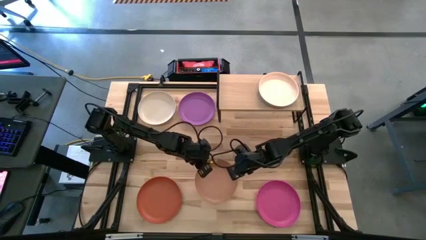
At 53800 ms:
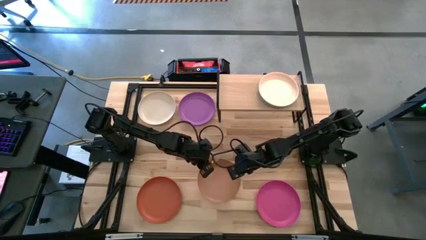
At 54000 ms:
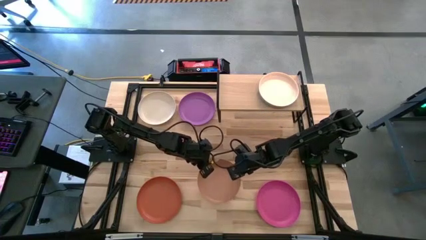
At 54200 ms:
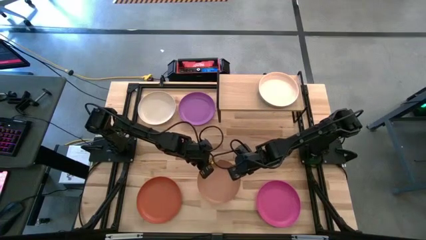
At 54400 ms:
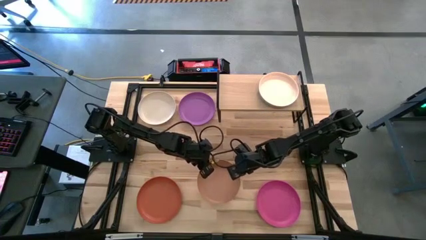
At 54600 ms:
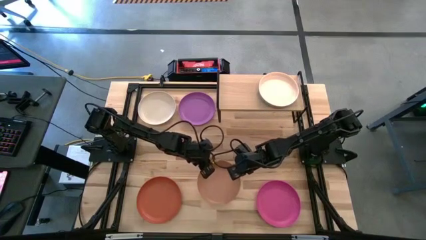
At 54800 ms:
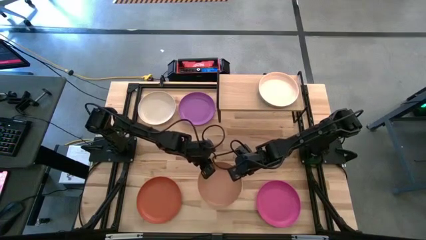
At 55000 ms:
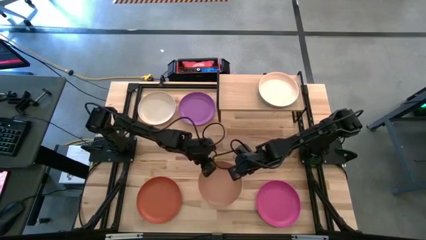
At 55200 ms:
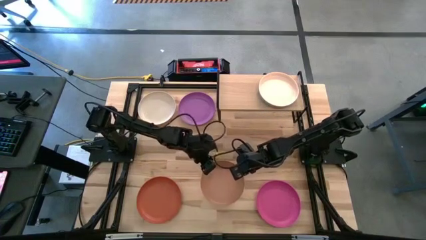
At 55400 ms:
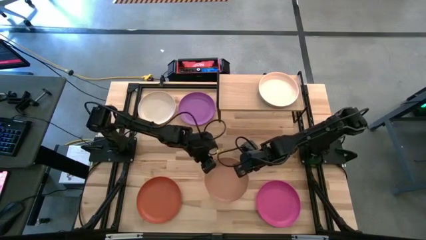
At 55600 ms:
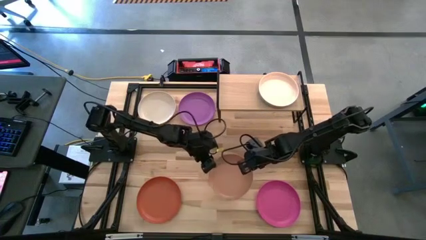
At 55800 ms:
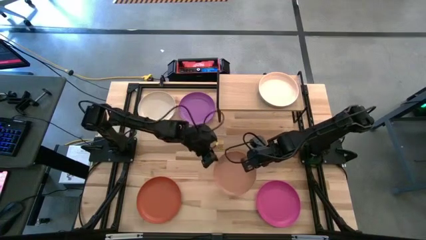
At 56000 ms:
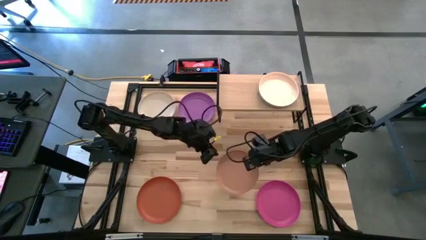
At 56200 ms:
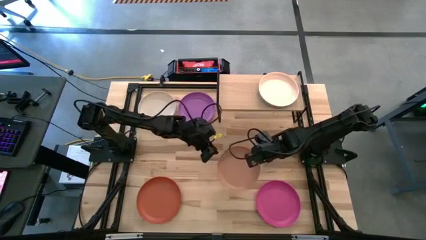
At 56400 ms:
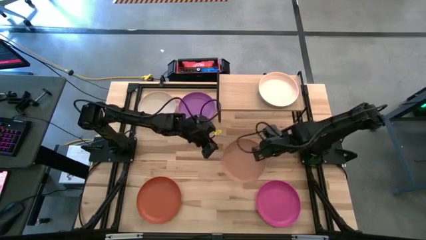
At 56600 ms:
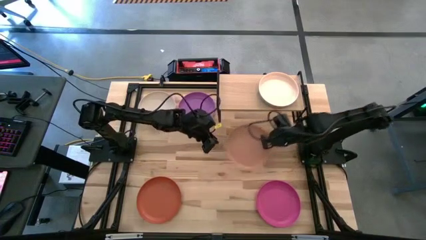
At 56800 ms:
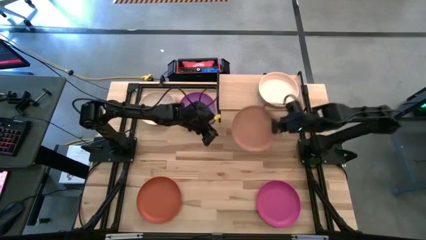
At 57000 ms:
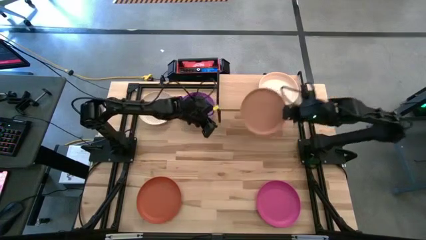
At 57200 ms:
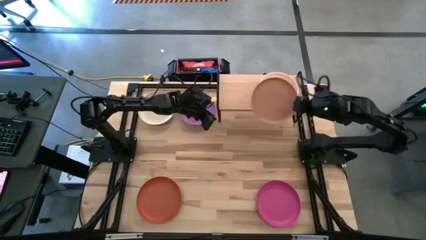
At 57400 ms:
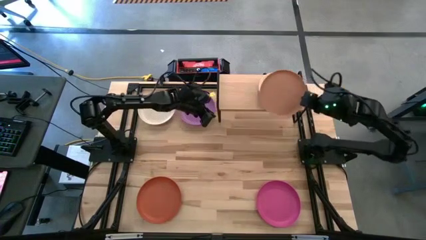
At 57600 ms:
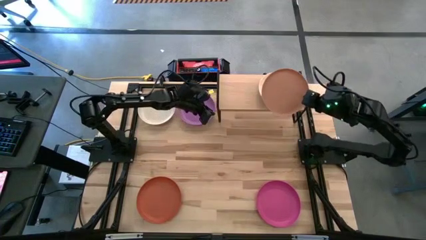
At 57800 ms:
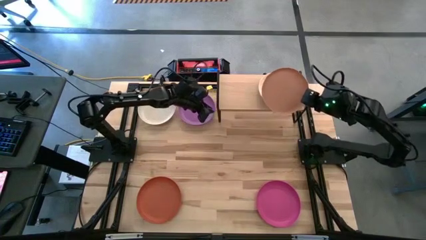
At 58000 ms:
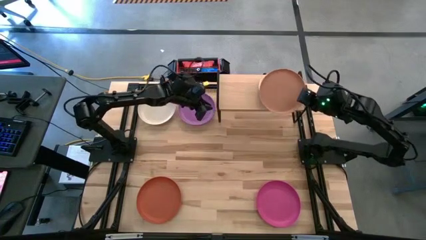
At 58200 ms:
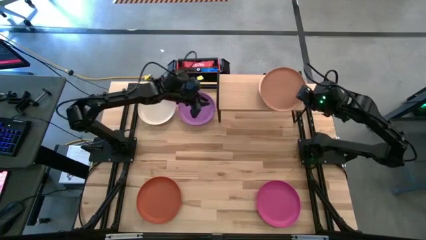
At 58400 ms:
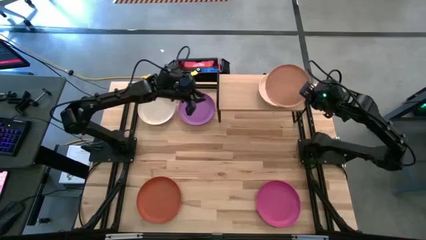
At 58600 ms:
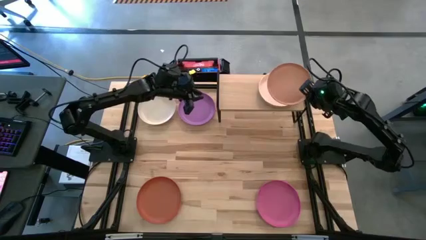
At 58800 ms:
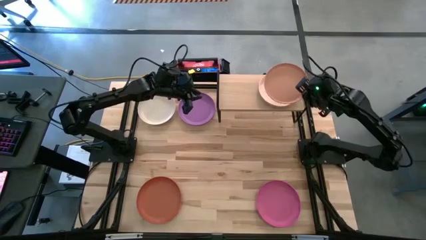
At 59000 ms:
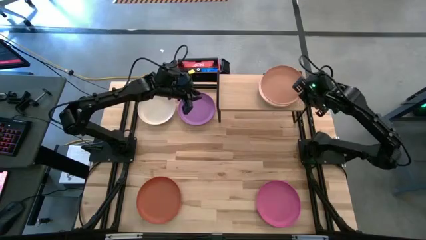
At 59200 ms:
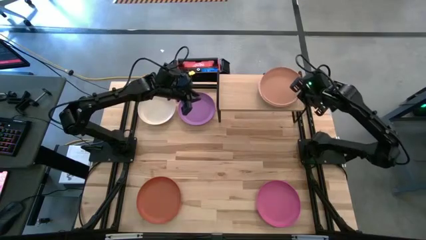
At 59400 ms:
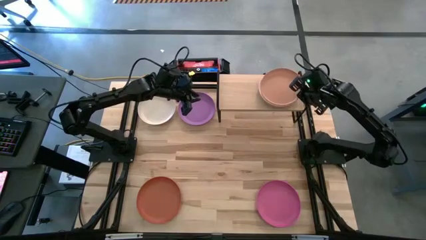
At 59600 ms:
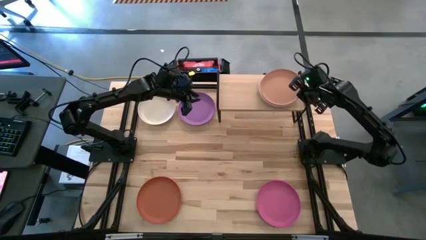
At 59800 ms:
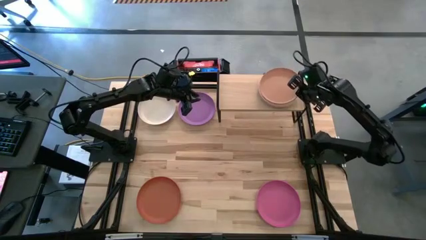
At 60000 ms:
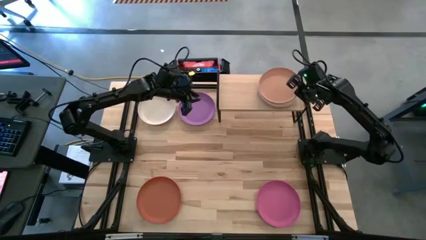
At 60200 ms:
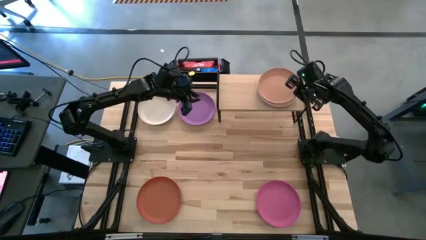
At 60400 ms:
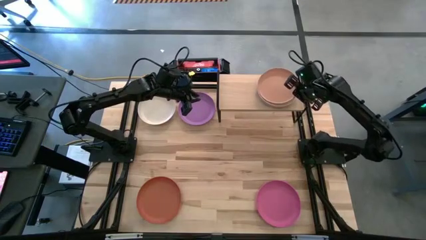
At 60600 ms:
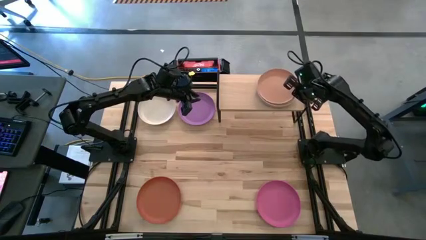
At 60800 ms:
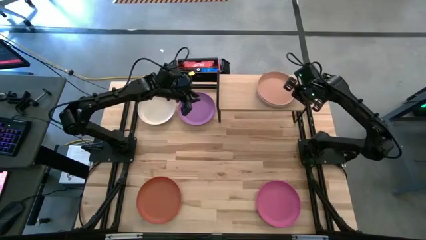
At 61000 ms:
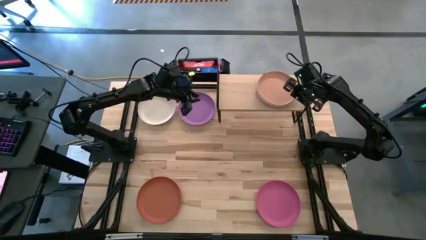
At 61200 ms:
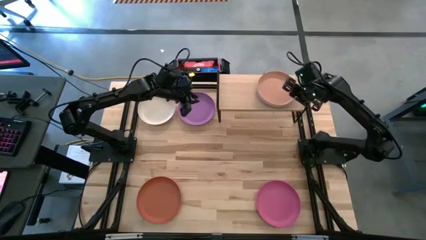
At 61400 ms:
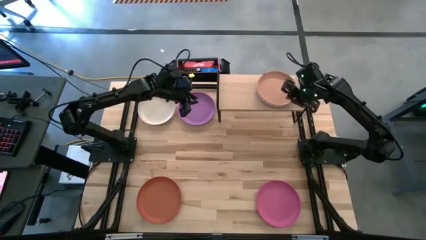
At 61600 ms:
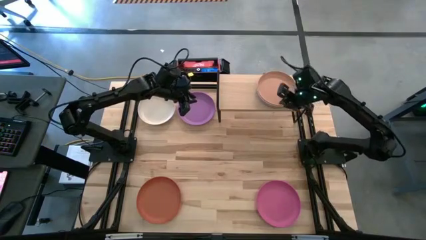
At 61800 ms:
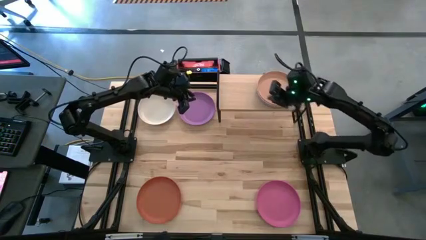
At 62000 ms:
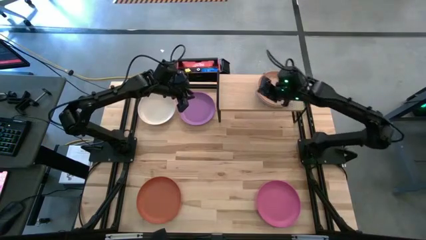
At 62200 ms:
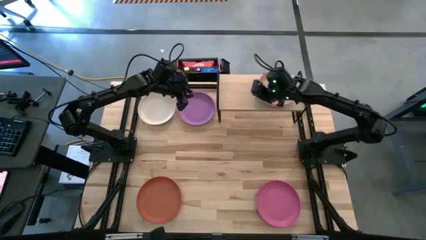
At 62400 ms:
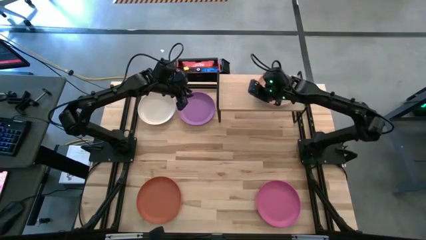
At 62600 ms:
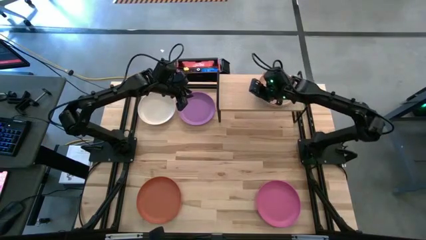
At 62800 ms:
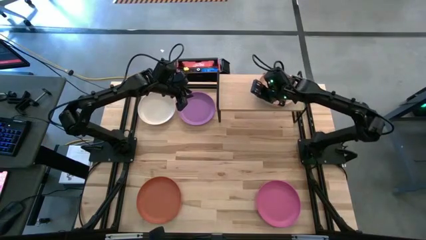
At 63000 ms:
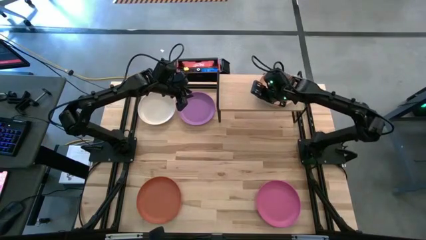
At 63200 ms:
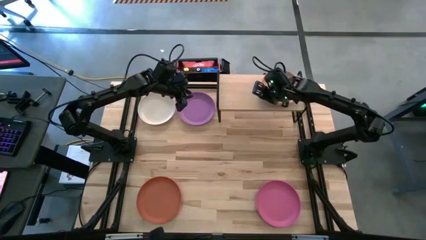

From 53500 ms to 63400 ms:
Task: Place and stack plates onto a shelf
Stack the brown plate on top of the light orange stacked plates on the shelf

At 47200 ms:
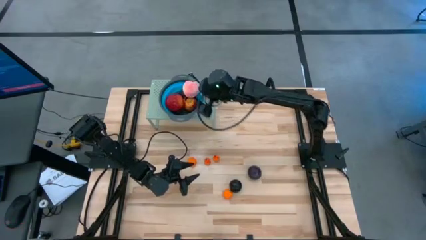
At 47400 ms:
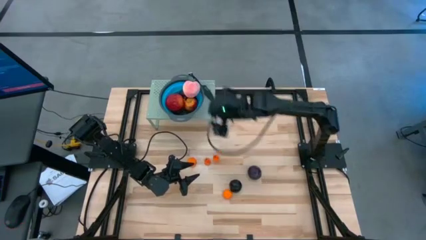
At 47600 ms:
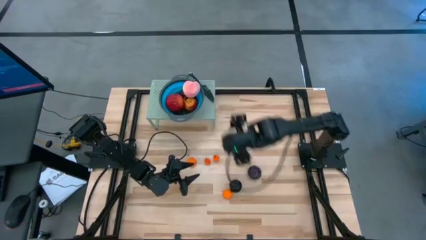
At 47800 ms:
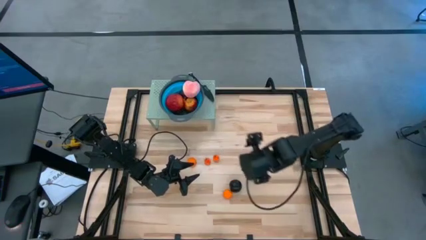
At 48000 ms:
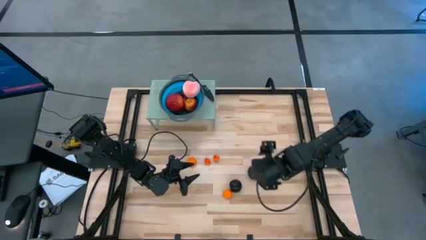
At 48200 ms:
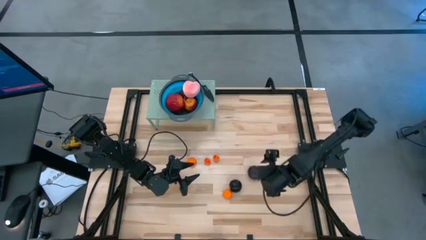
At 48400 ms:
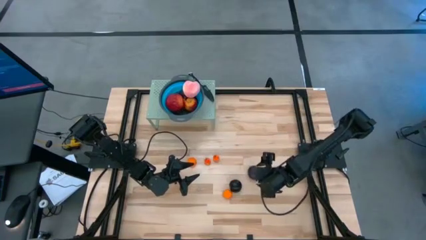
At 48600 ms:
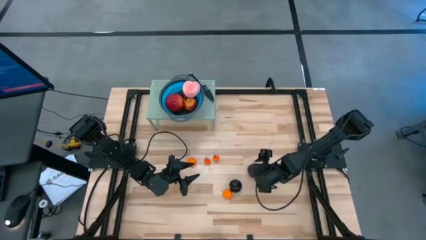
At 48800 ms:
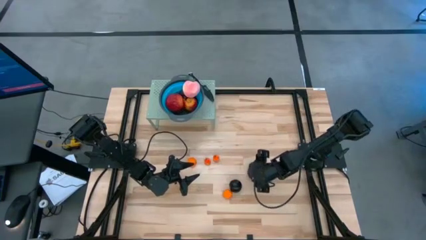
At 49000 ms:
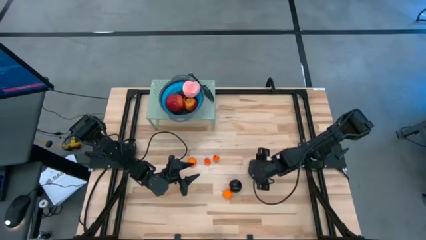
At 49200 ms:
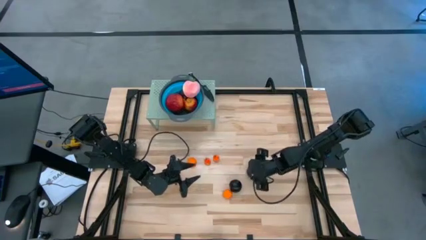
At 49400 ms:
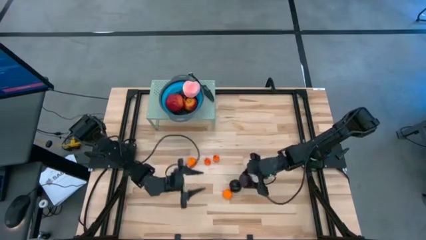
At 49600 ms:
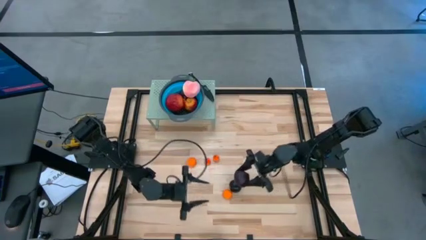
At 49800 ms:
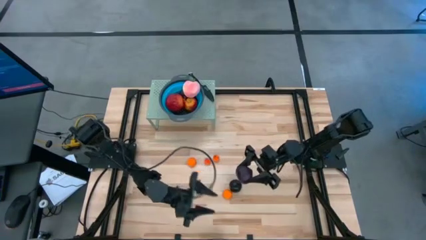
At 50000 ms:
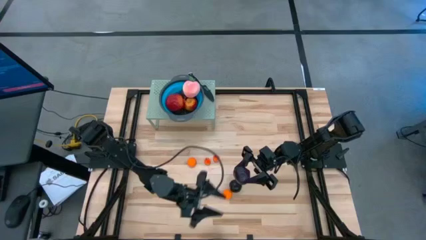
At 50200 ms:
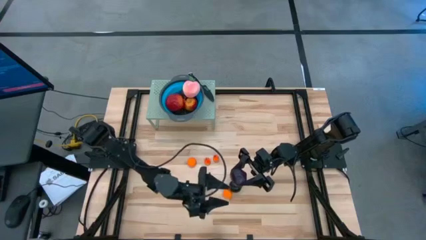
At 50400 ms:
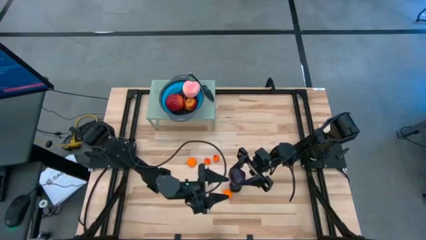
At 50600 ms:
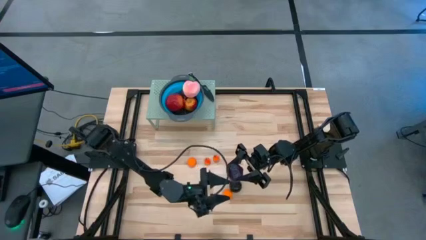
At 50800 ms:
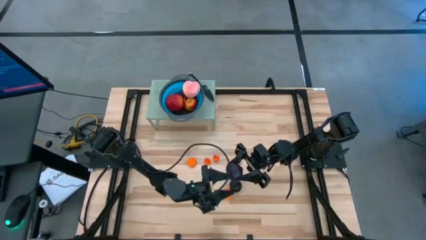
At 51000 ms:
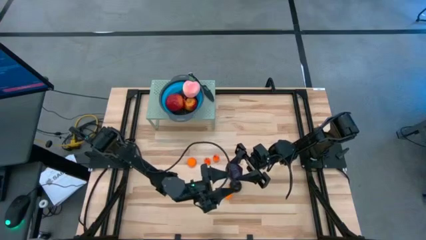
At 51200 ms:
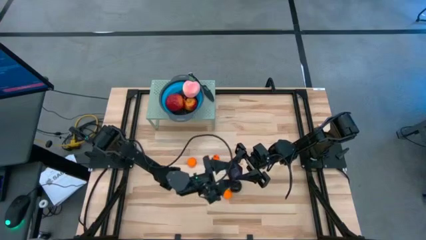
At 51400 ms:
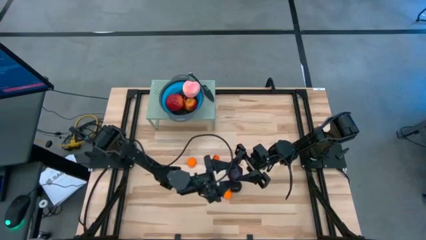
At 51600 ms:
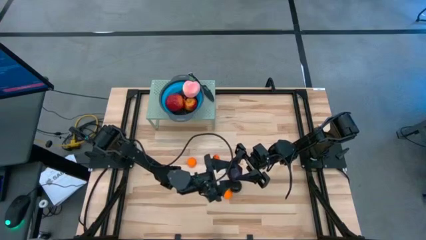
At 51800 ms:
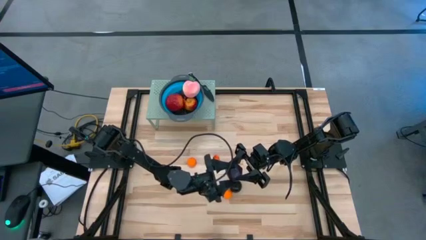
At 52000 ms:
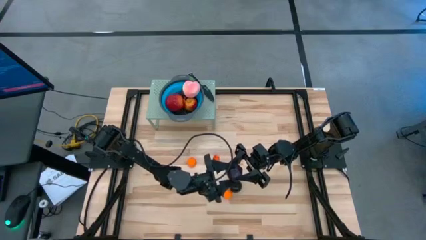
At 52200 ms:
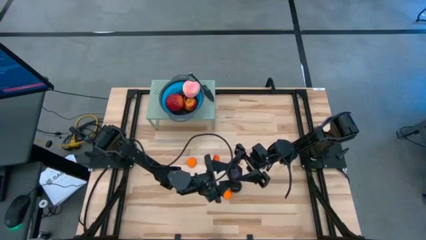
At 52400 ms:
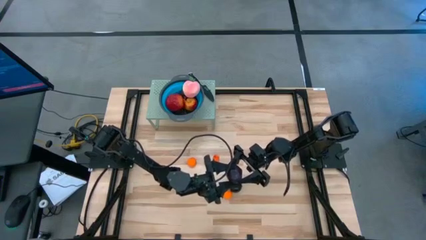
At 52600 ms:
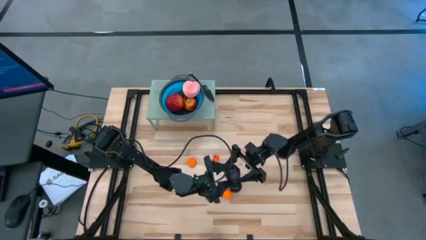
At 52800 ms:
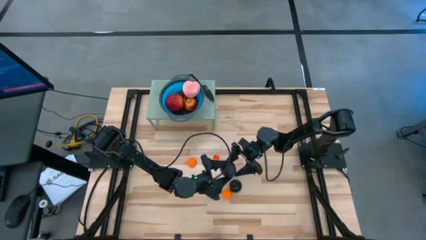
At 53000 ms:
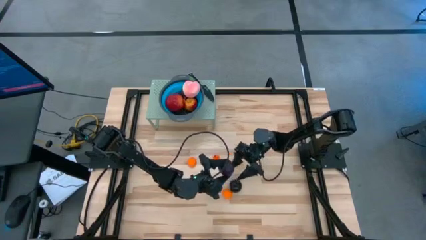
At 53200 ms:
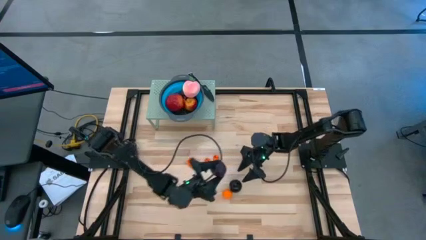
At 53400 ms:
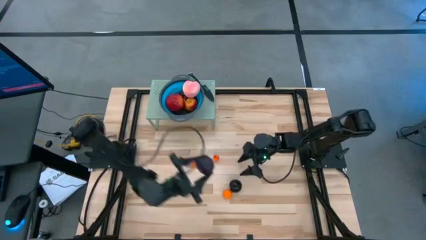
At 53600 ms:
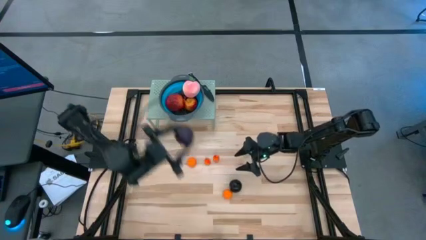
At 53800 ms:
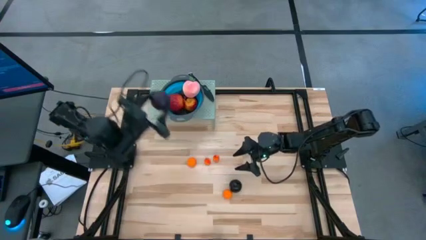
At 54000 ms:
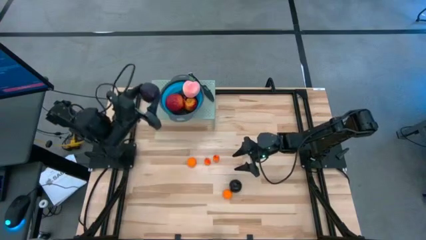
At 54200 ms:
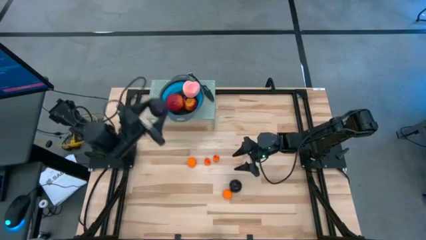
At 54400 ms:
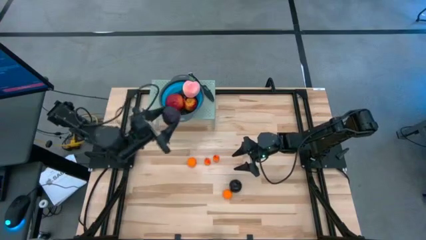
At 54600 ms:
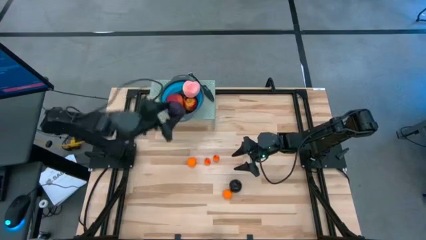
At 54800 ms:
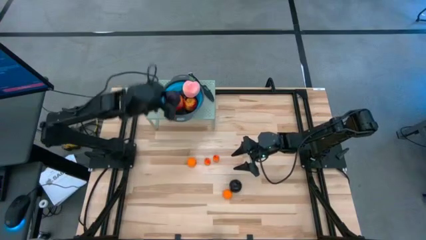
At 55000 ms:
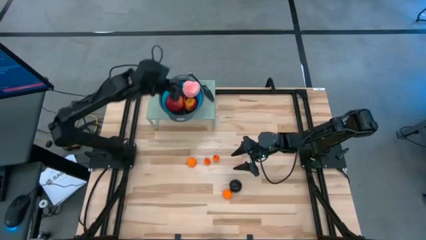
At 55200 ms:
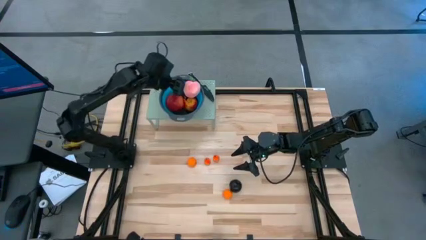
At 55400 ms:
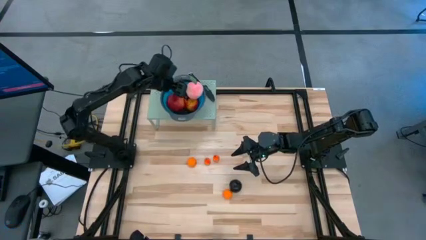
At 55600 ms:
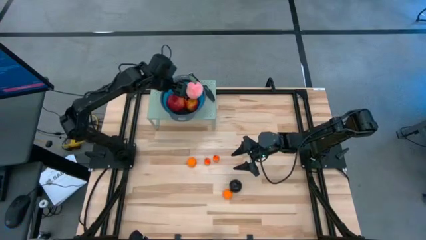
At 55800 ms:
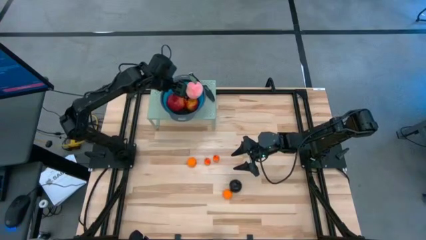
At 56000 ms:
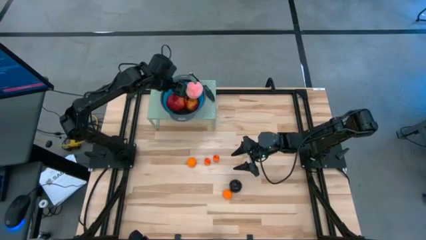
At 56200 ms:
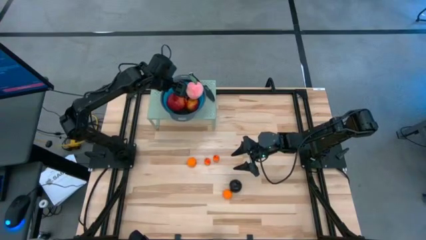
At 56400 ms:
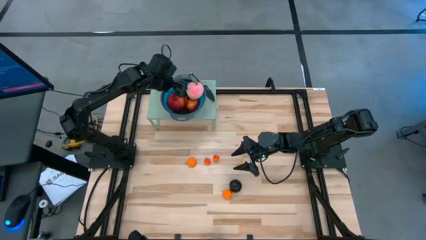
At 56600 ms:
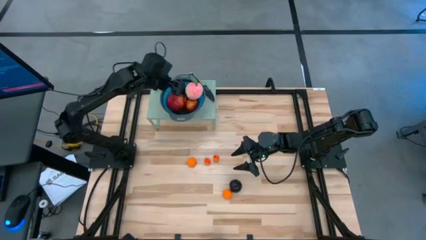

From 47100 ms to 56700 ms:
Task: Pick & Place Fruit
Put the right purple plum into the blue strainer bowl on the shelf
